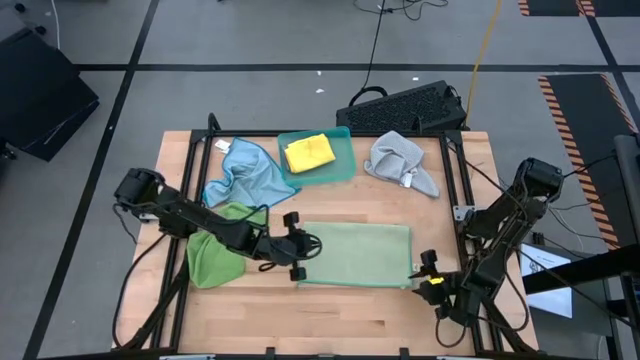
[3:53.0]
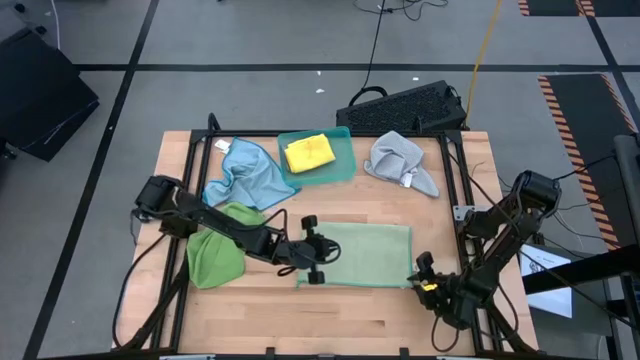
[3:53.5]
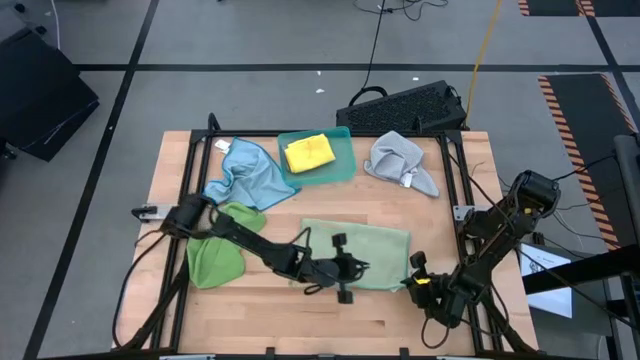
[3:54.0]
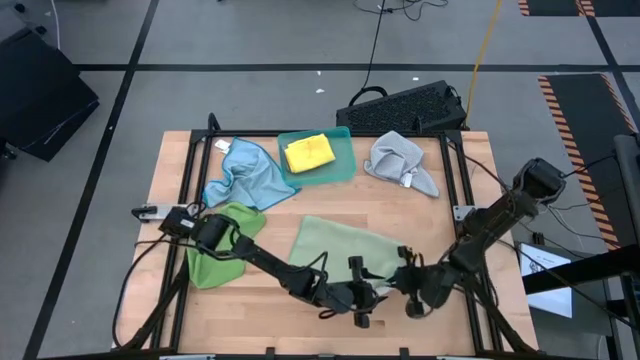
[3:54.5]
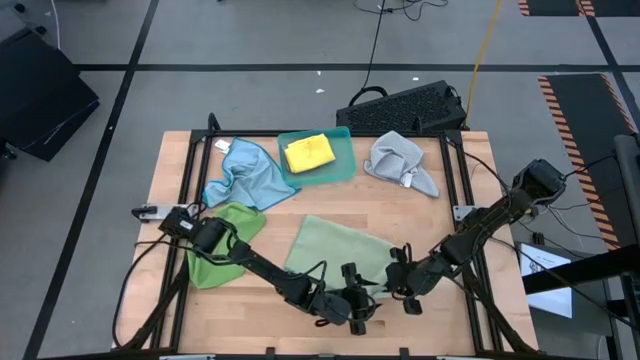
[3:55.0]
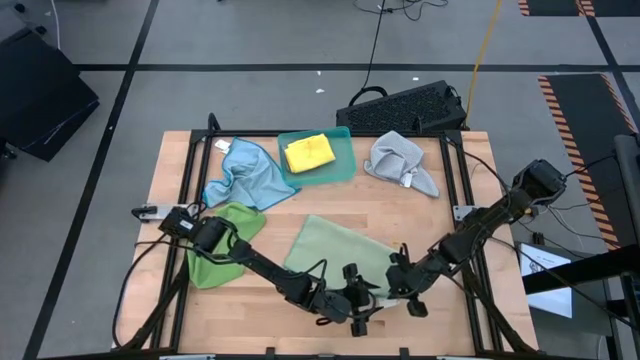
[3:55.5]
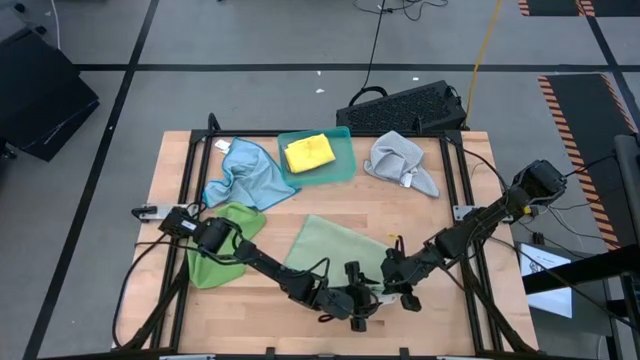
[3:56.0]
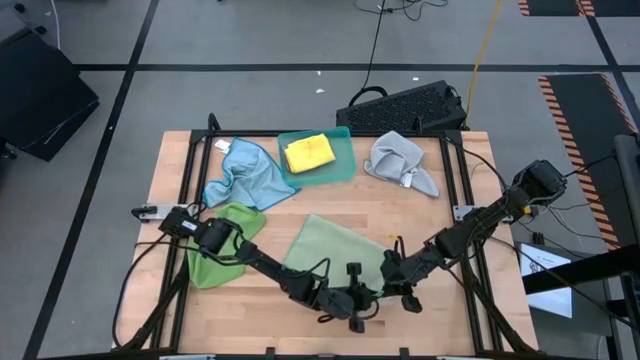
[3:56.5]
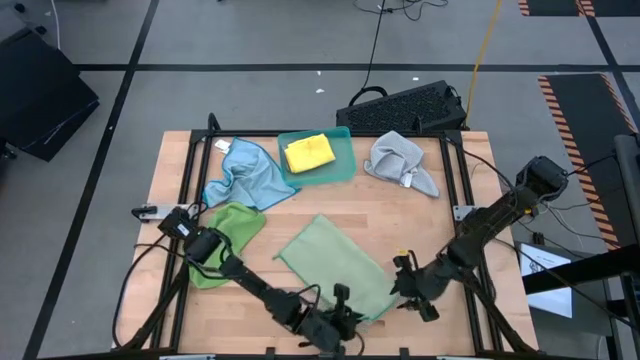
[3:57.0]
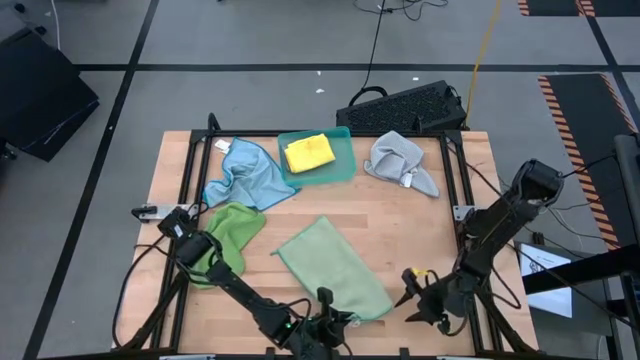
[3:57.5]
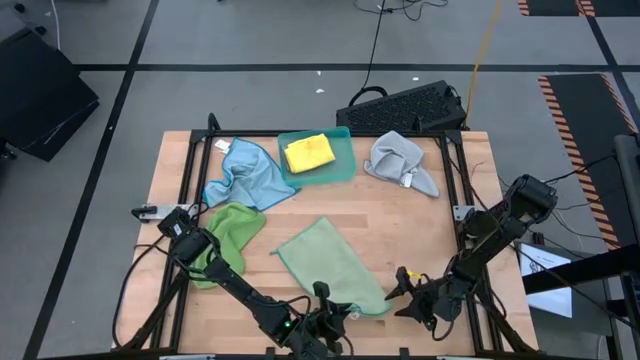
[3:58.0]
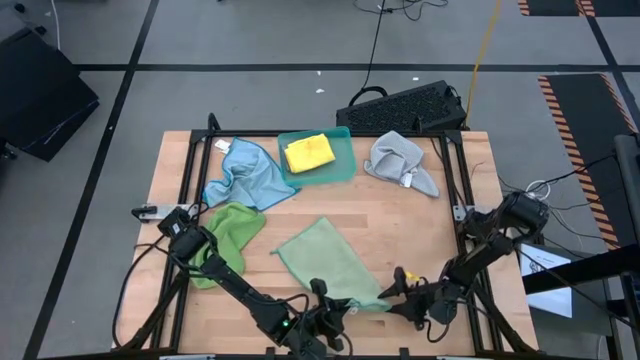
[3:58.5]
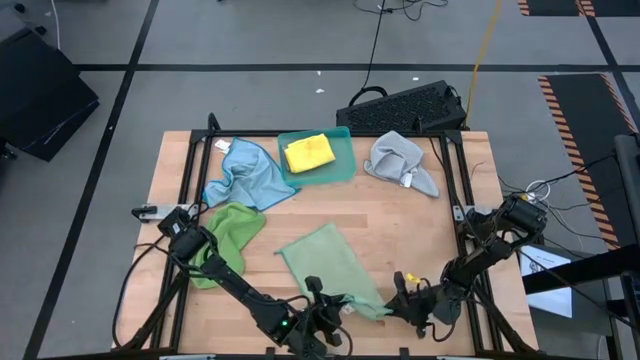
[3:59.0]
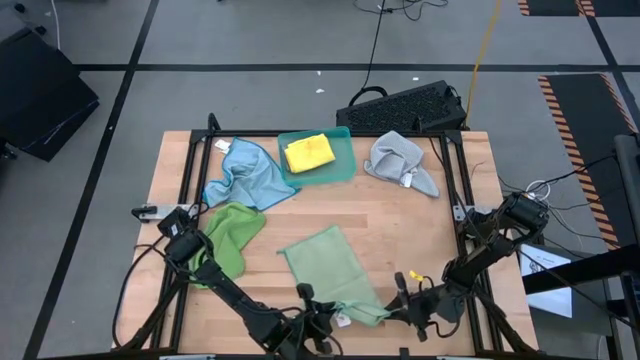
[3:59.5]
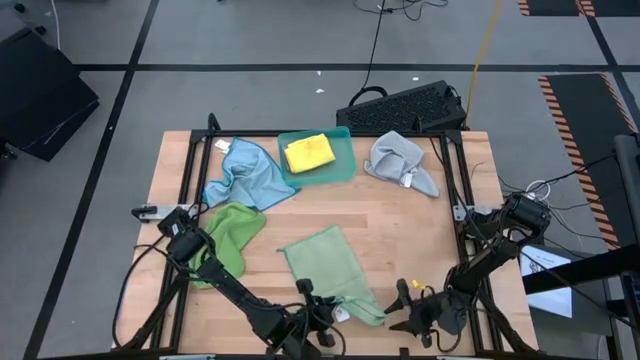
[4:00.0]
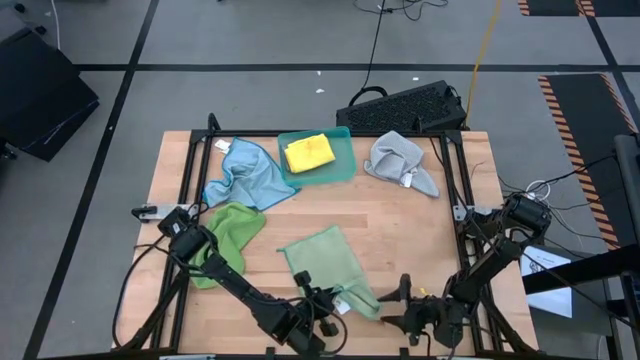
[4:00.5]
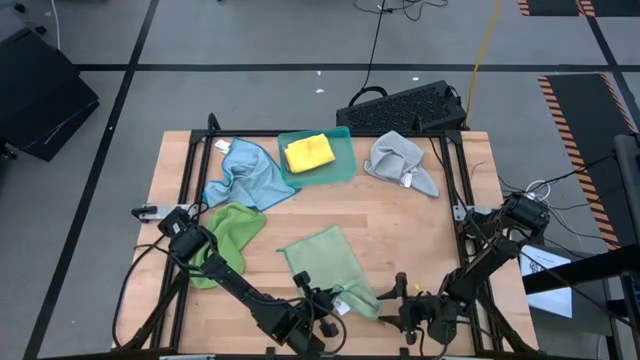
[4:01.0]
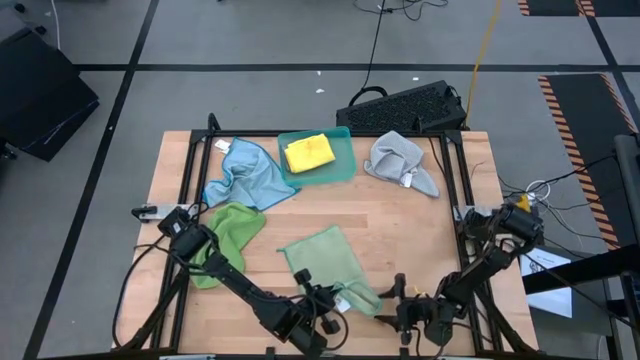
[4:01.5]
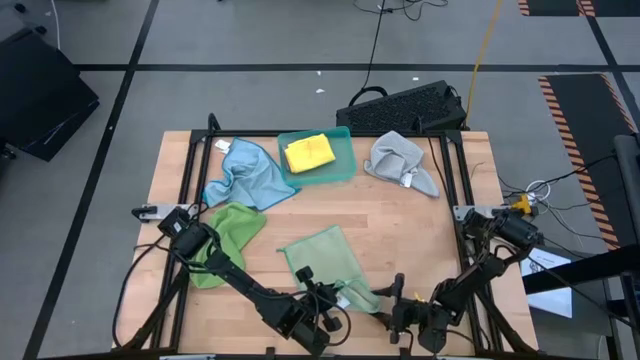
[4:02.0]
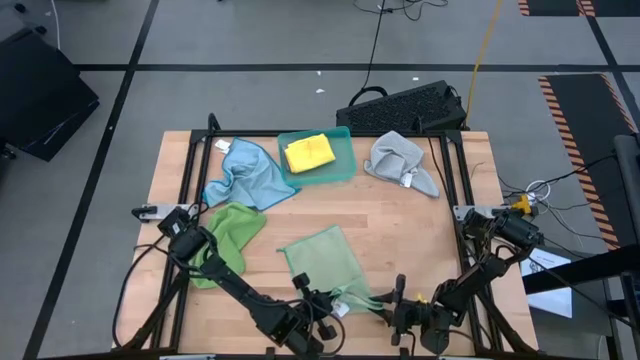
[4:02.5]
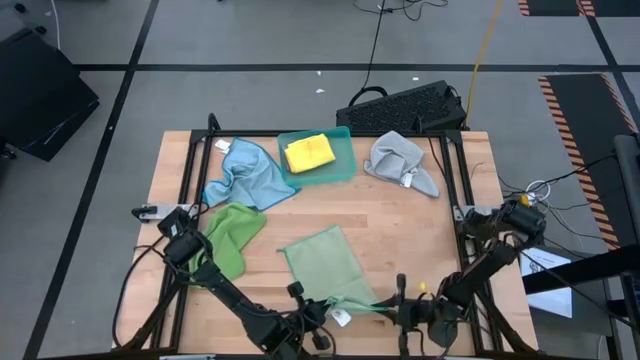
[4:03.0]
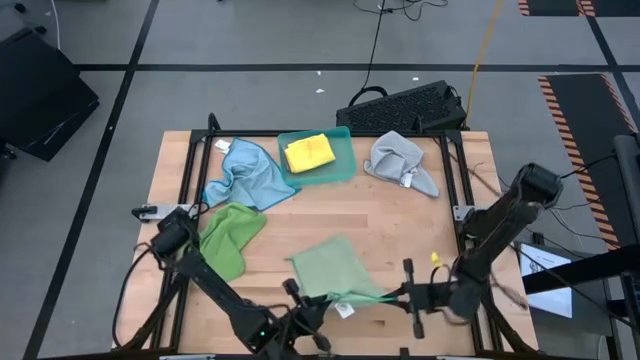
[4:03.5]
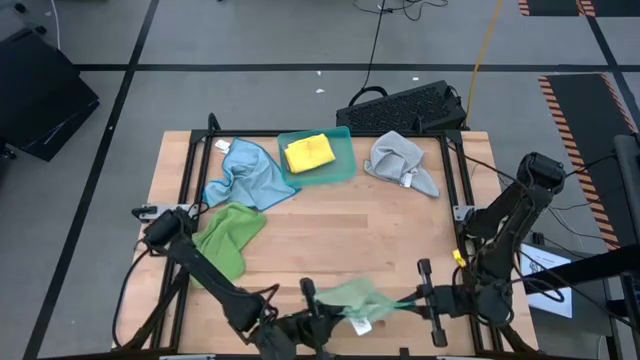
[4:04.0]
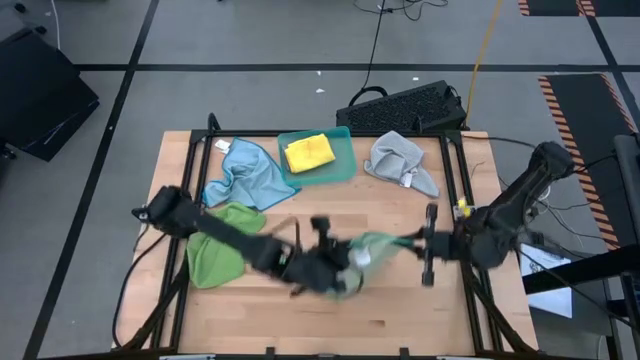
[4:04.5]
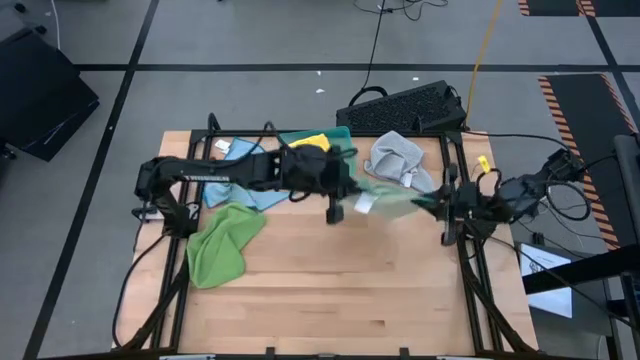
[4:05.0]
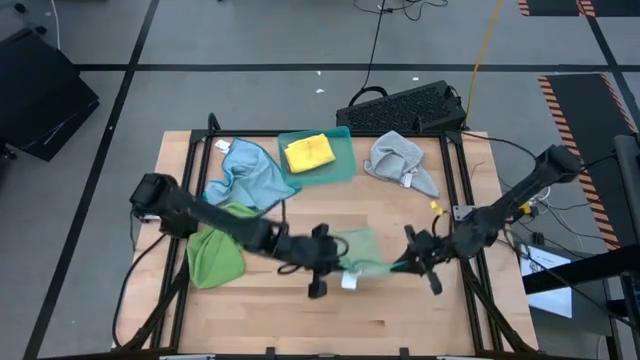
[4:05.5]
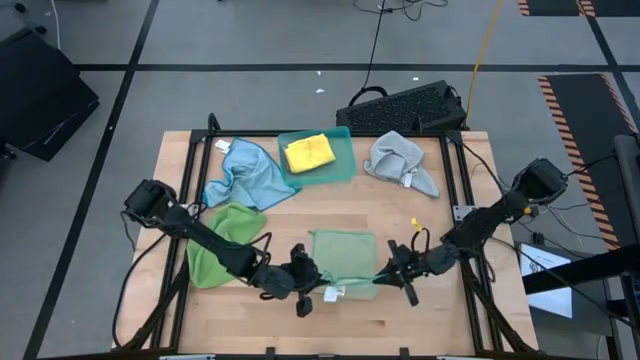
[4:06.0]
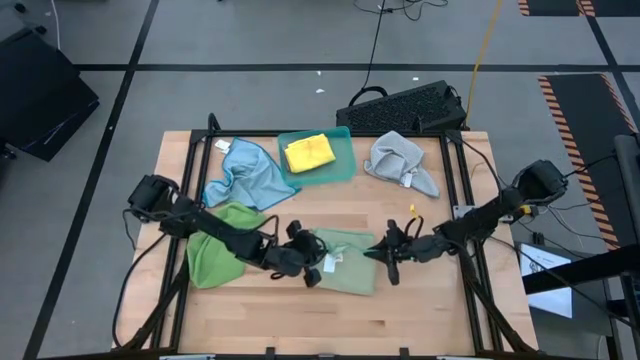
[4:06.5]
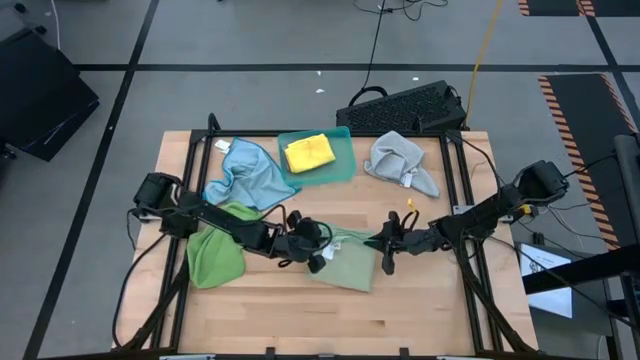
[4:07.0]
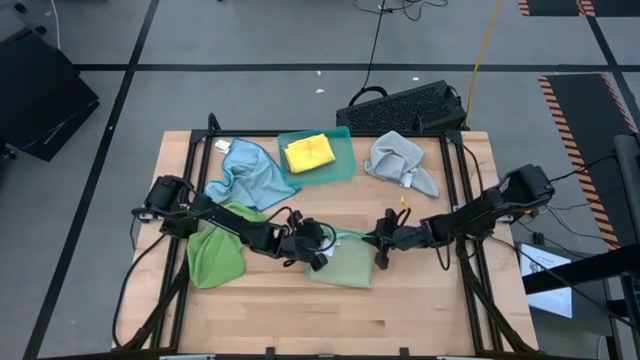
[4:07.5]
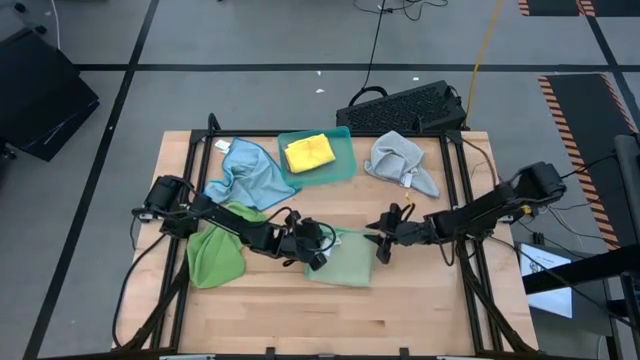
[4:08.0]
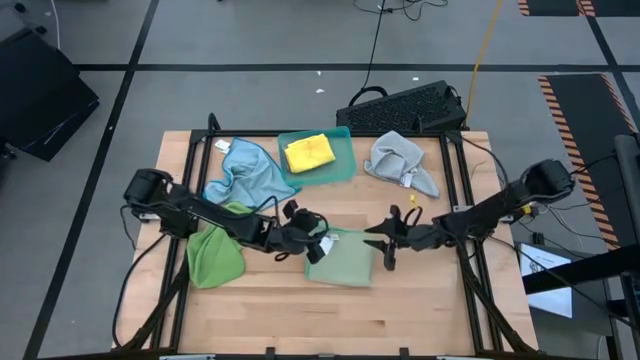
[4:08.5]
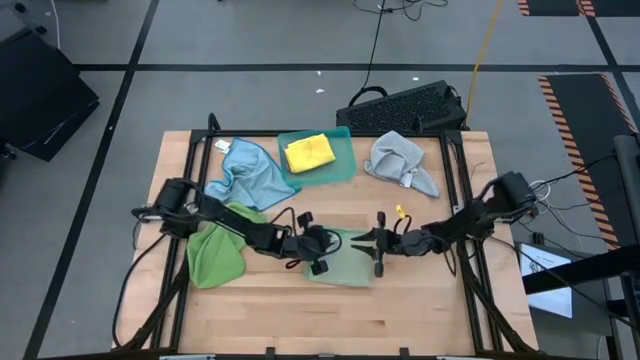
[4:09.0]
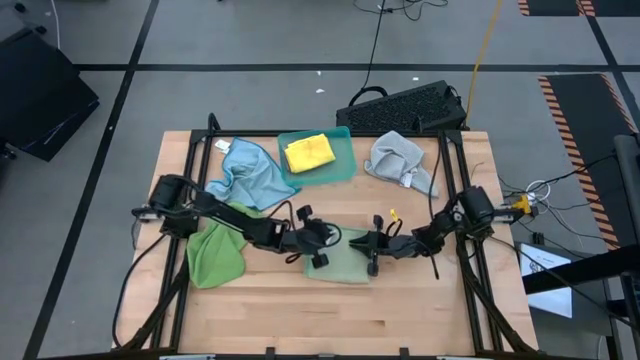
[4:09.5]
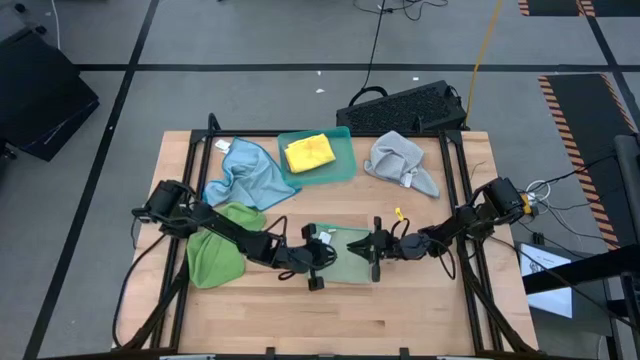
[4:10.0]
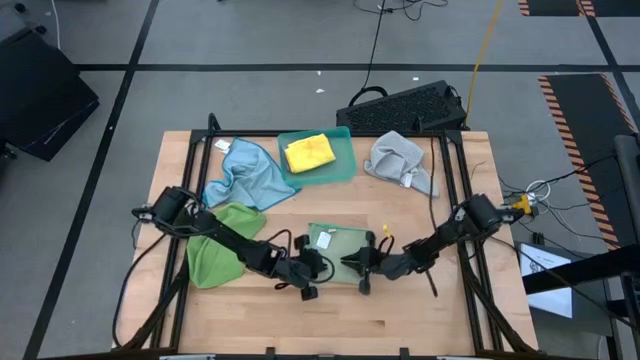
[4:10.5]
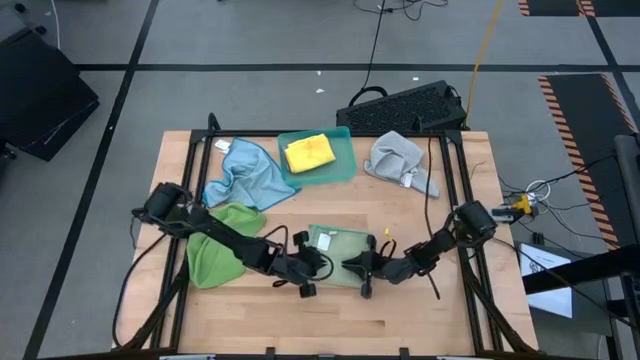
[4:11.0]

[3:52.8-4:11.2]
Task: Fold microfiber towels
Fold the light green microfiber cloth

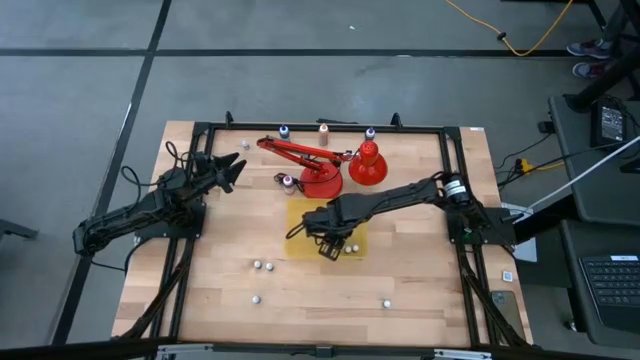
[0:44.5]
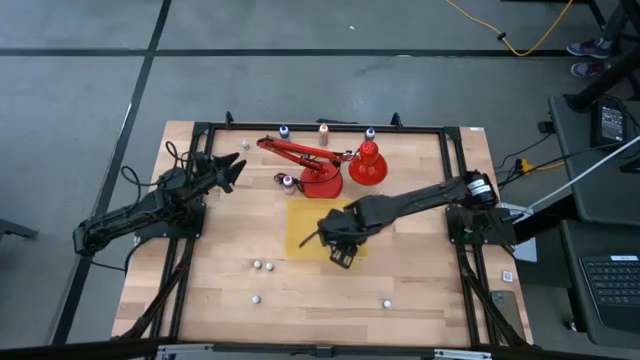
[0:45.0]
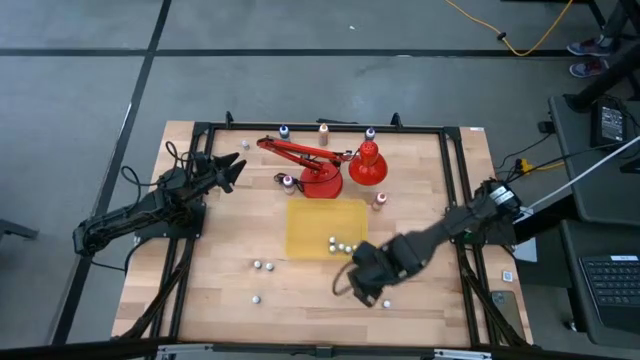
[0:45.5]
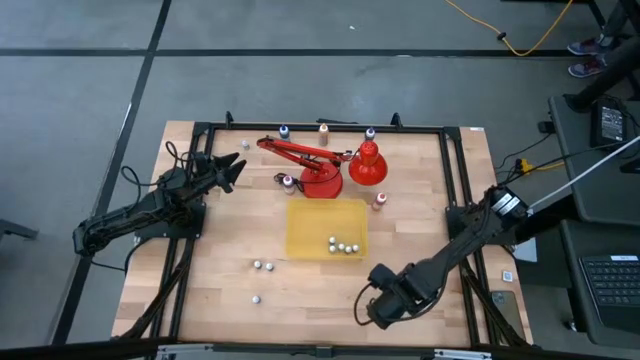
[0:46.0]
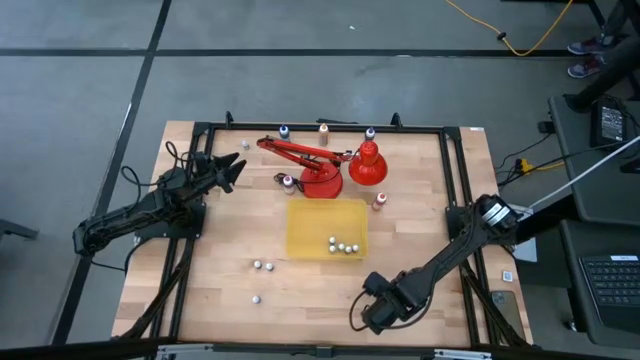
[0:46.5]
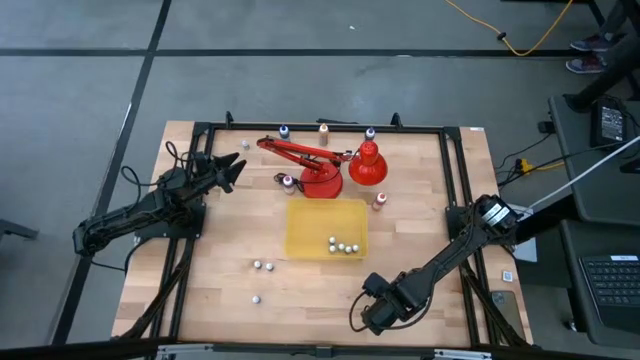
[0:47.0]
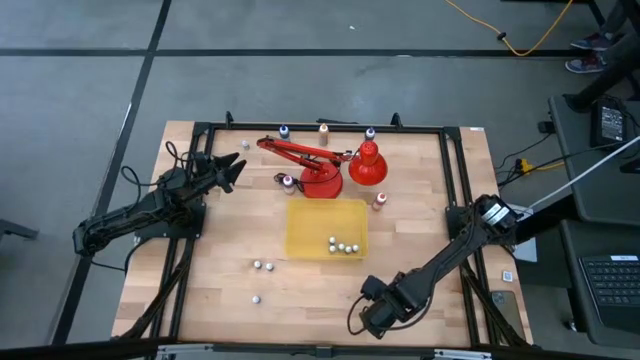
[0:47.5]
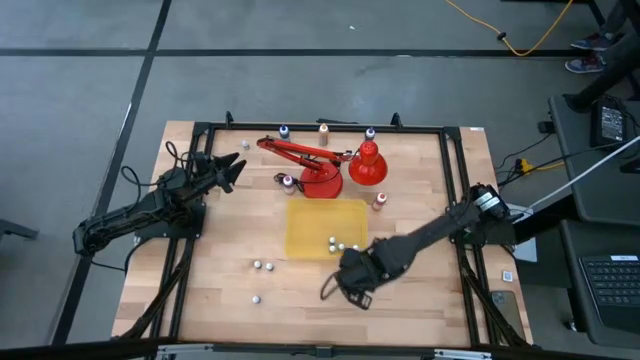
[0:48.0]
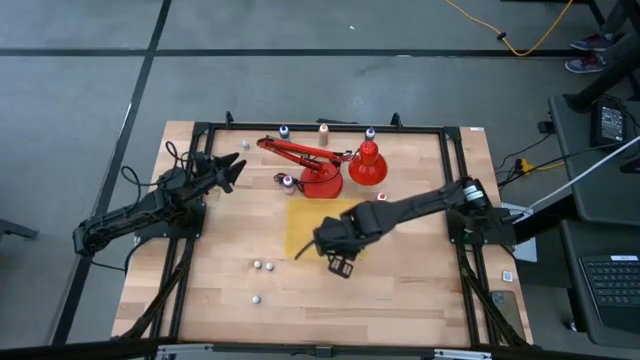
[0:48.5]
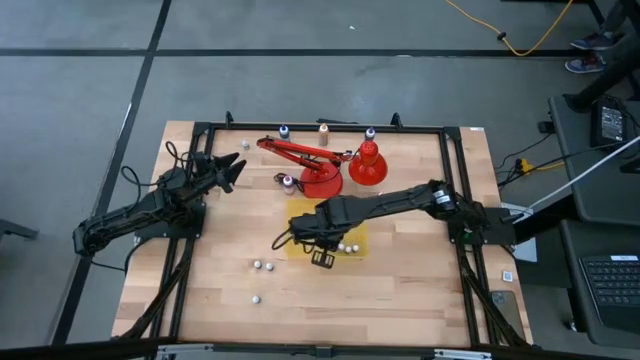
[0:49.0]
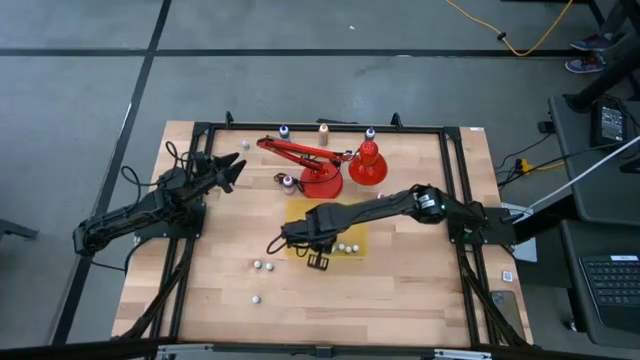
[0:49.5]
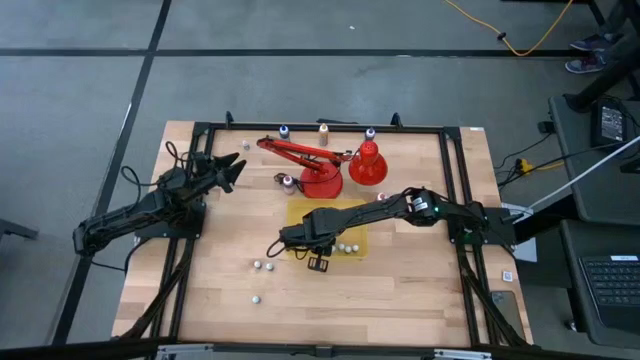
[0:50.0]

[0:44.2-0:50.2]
Task: Pick & Place food coloring
Put the small red food bottle into the yellow bin
